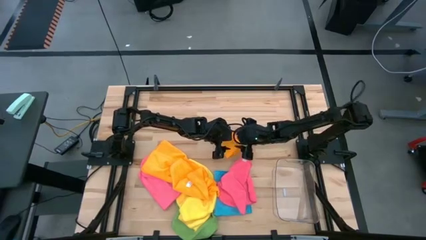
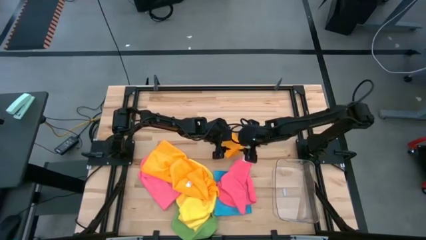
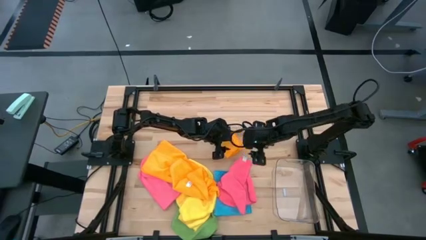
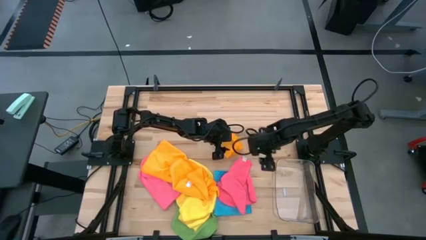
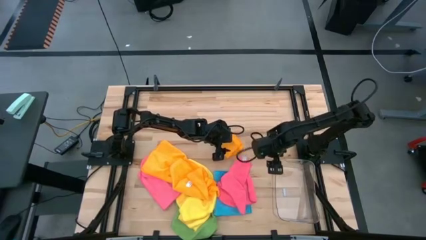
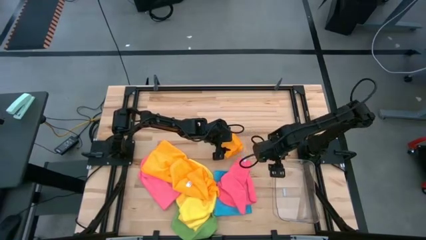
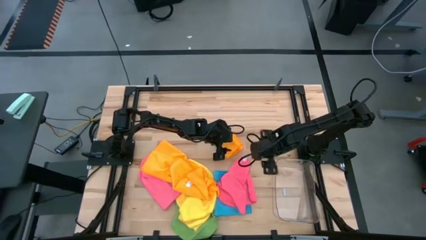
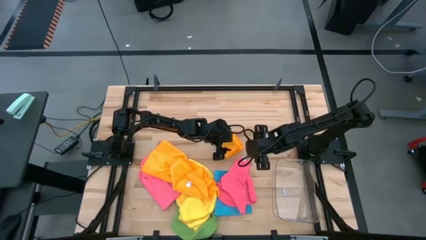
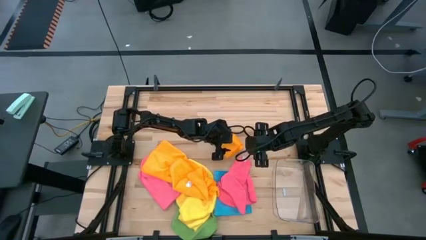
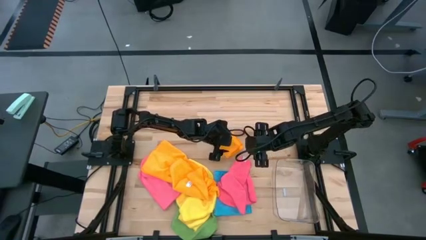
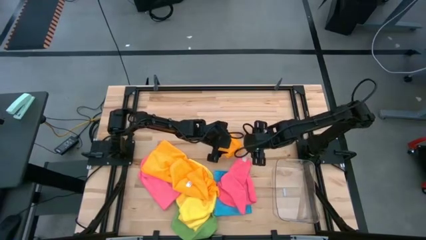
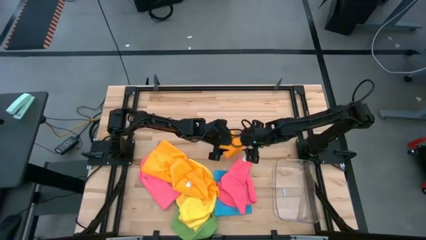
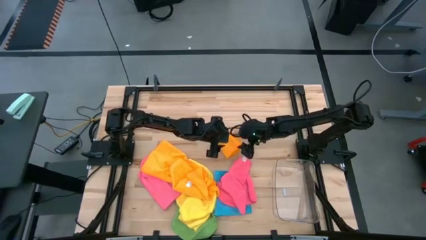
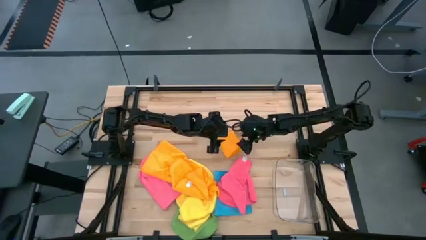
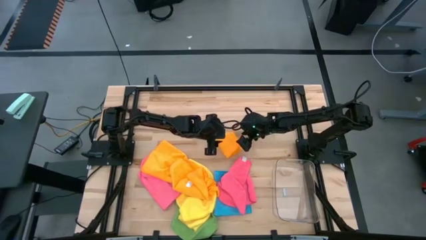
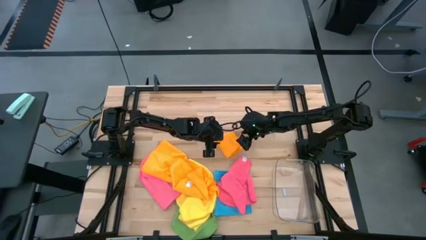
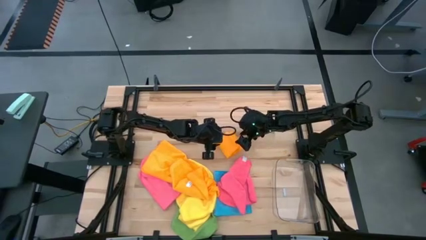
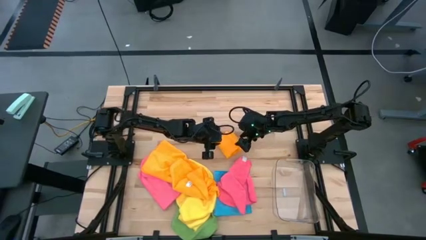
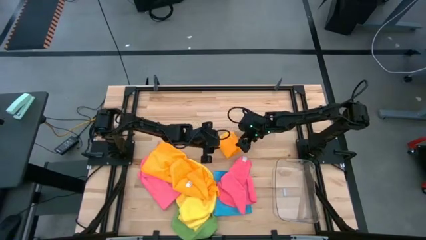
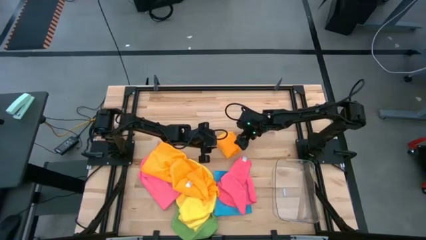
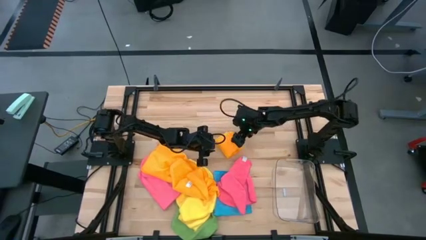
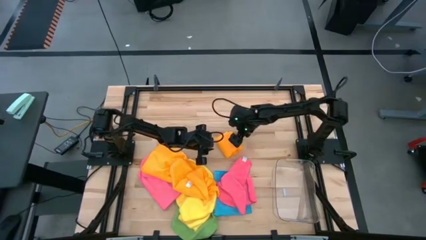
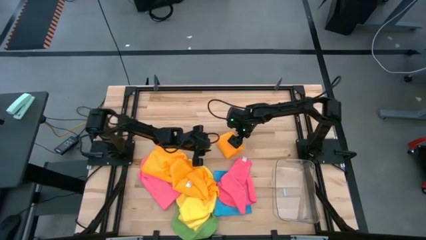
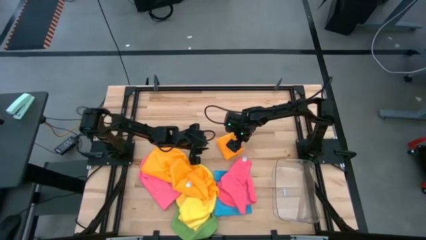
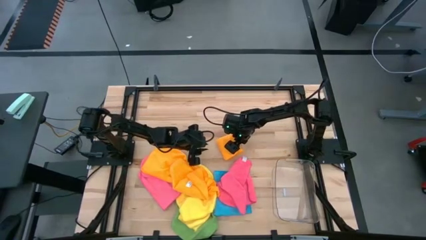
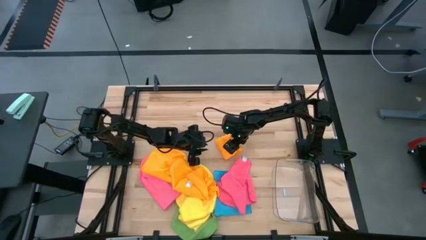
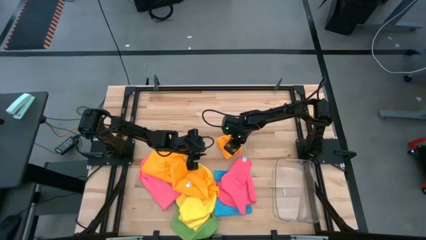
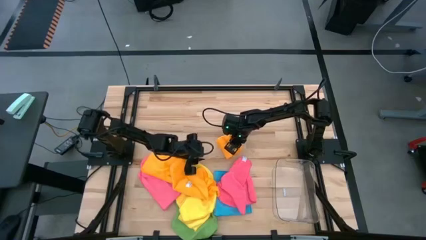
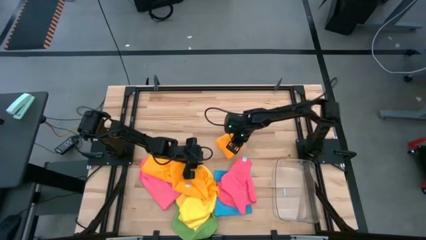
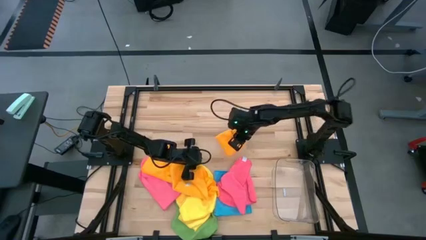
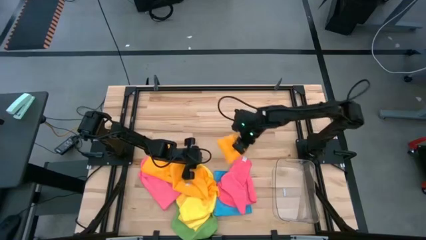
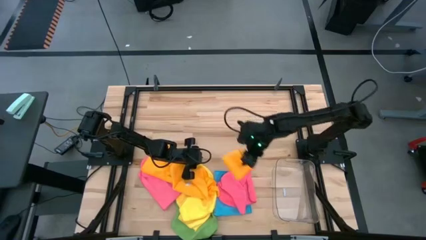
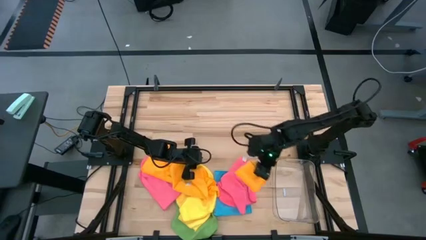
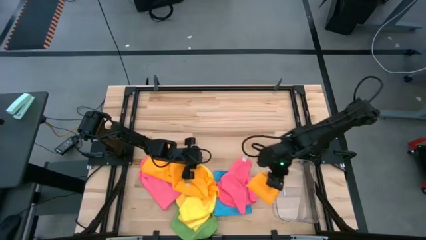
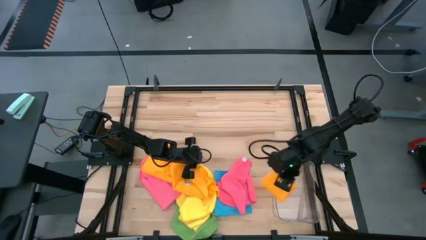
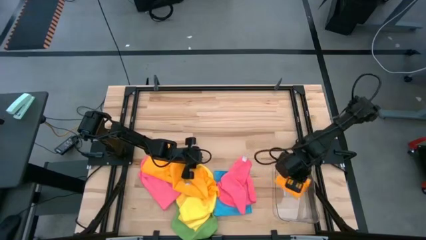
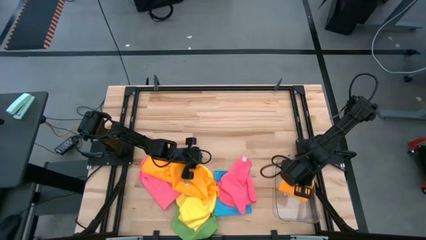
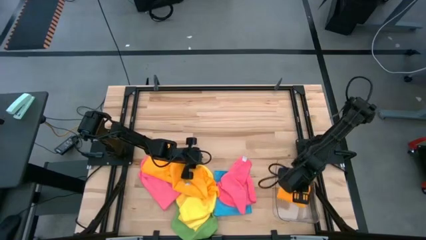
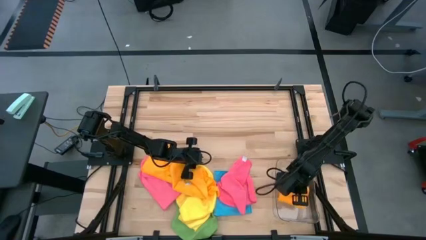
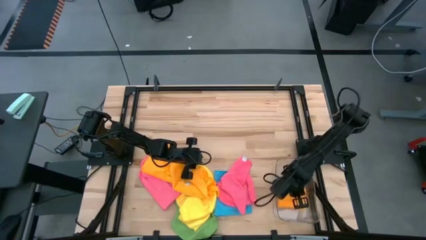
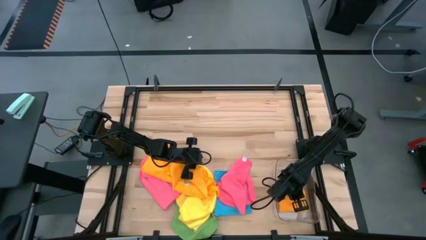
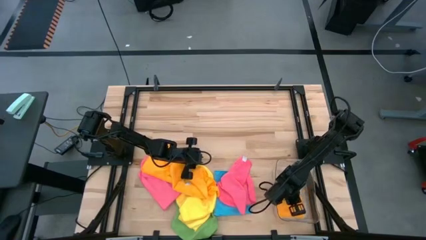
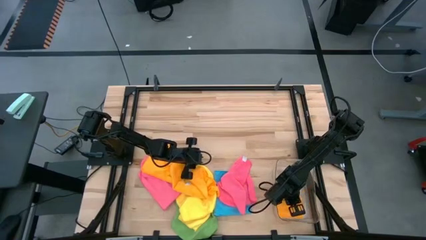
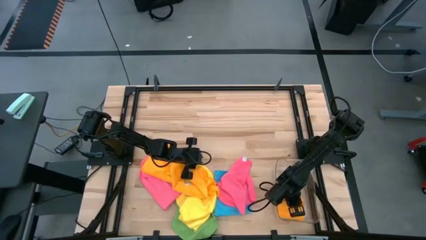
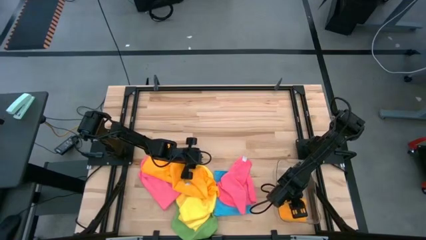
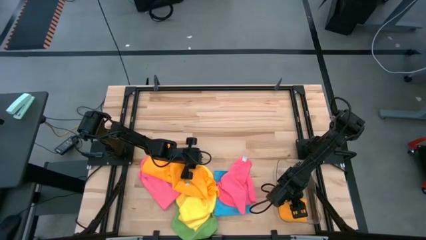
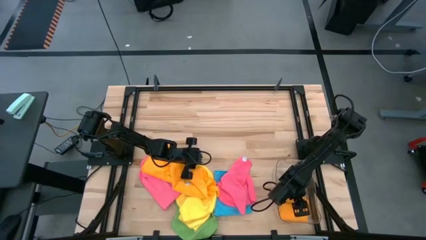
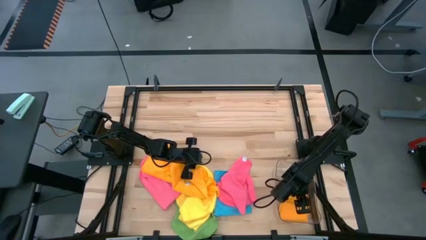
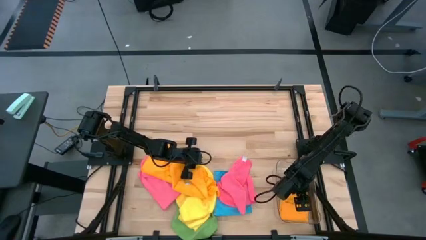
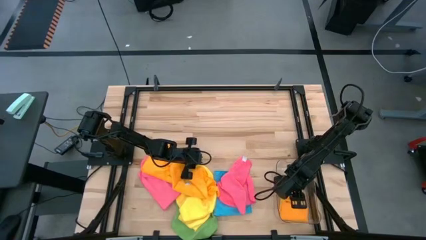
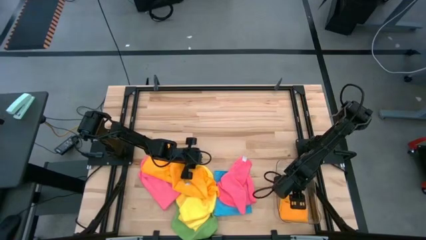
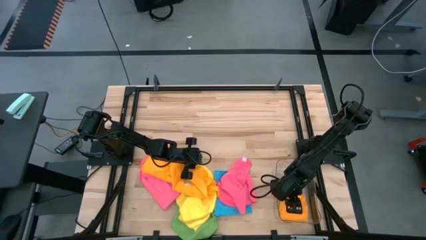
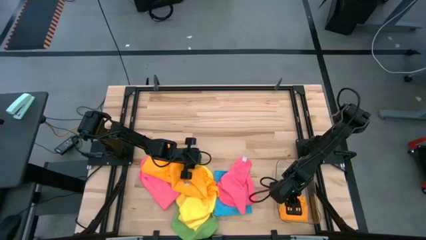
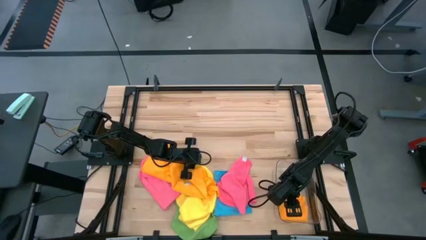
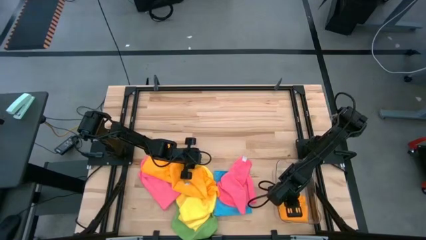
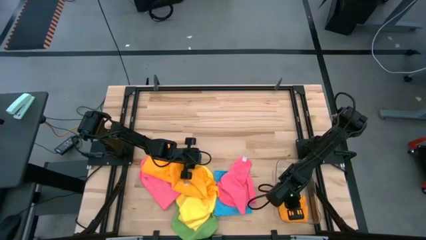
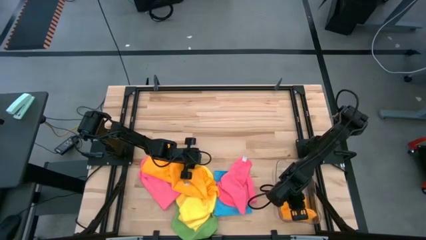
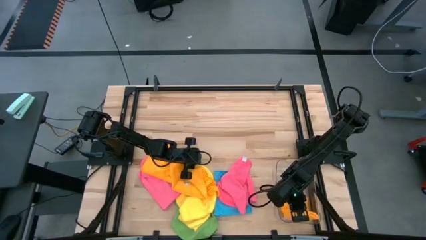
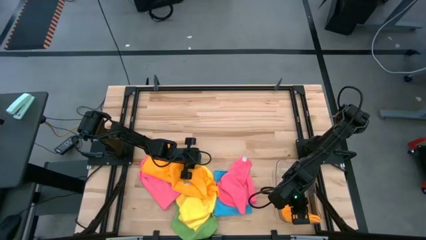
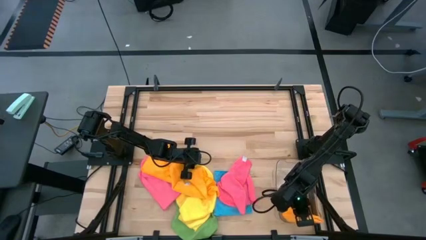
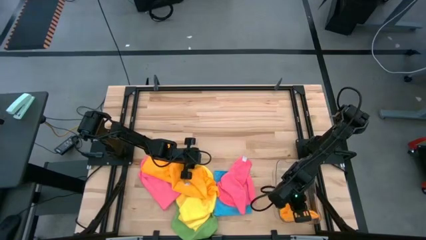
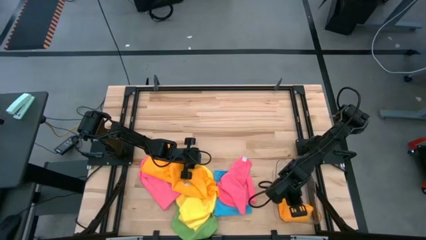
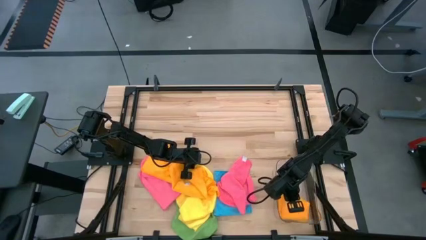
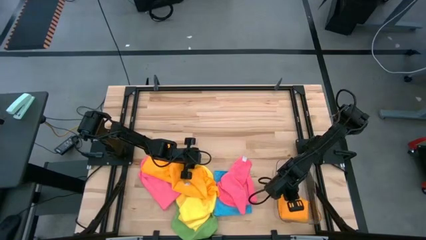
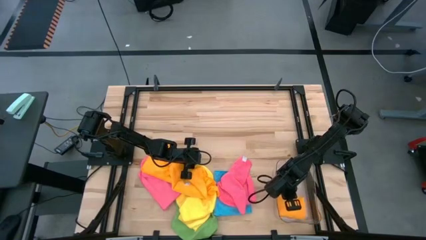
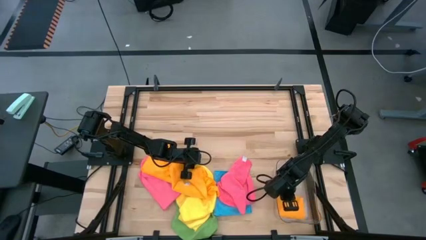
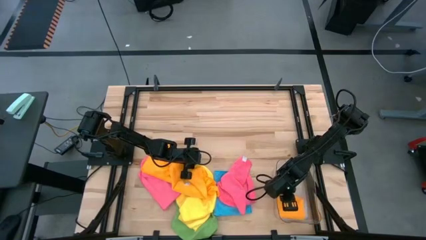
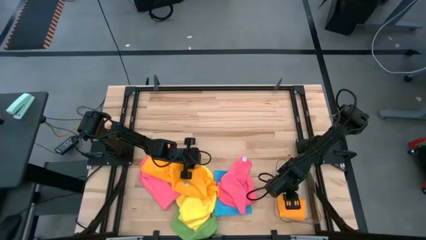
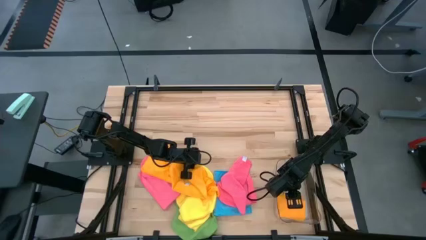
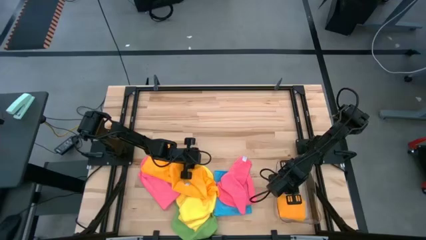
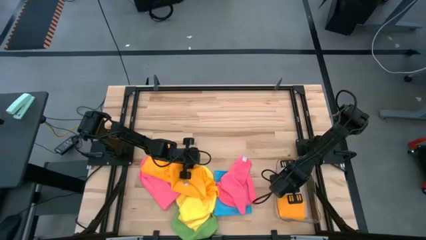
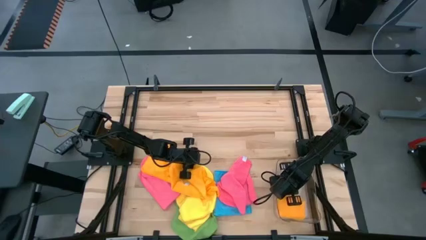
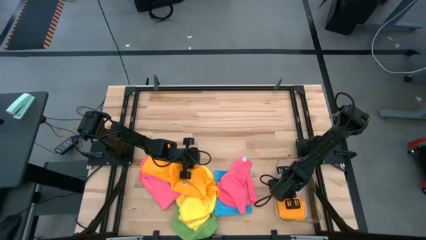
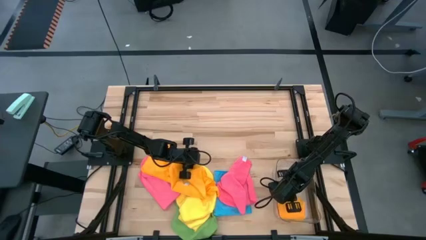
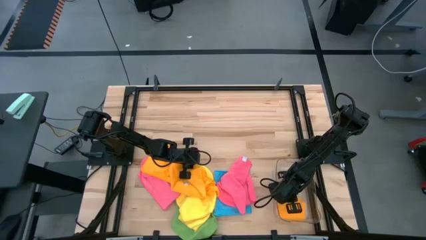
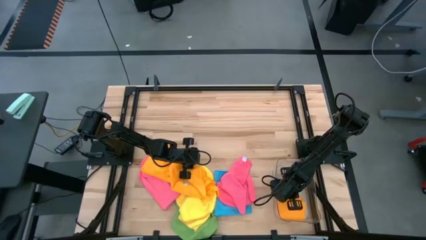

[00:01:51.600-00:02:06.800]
Task: Fold microfiber towels
Put the folded orange towel into the transparent bin

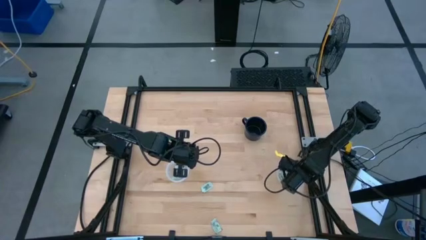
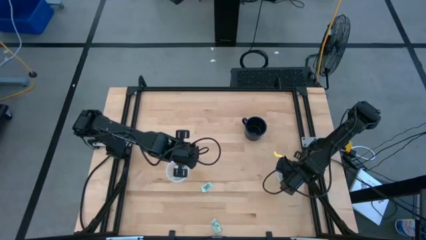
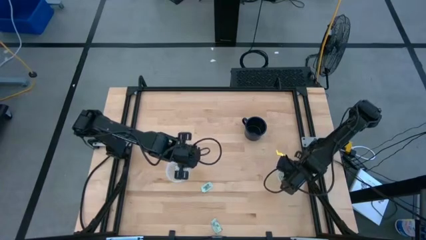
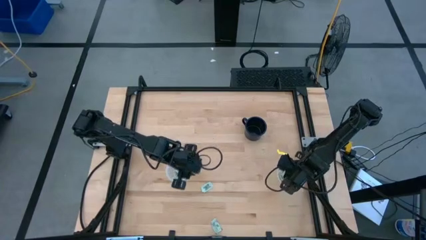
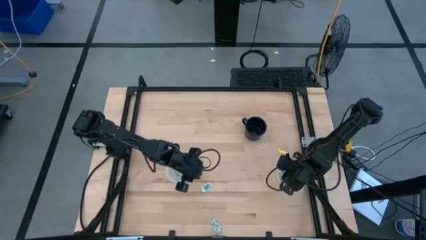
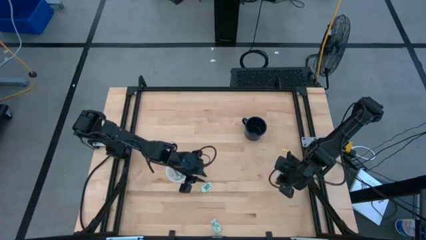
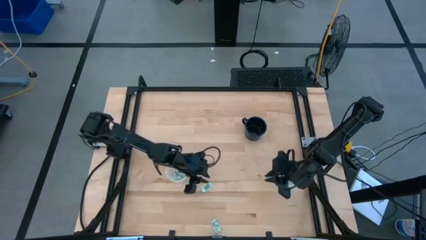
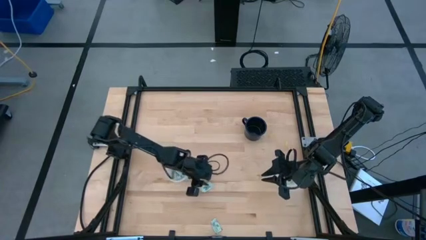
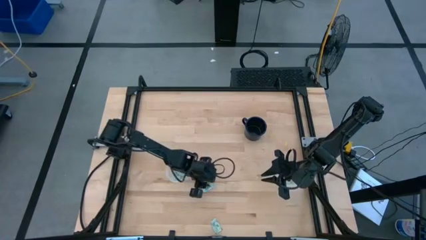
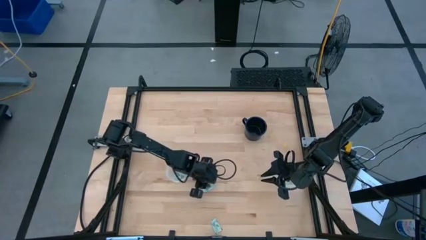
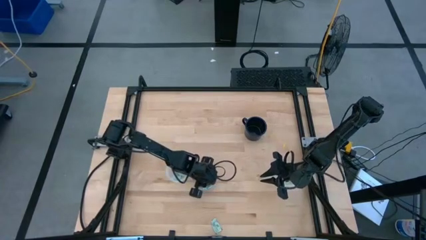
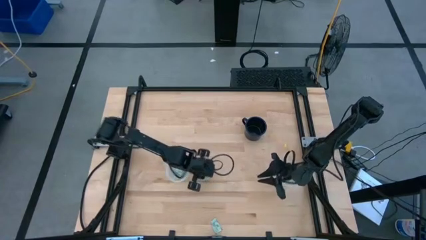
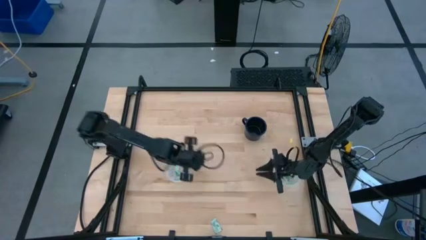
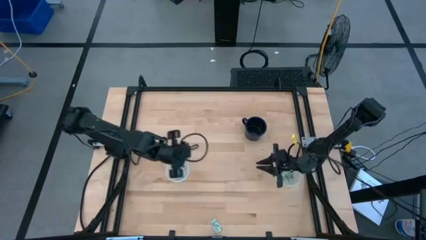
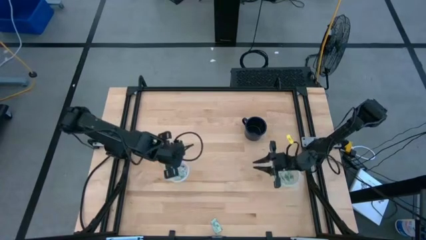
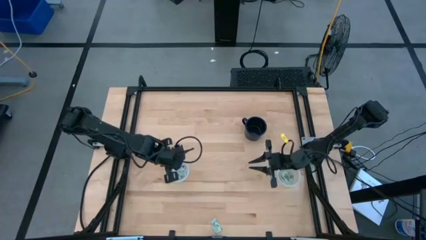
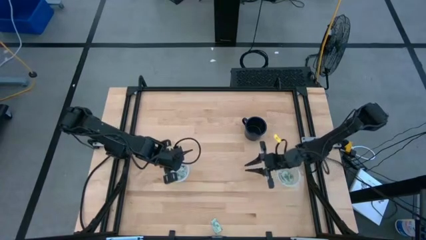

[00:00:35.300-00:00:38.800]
Task: Pick and place Stevia / Truvia into bins
Put the stevia packet into the left transparent plastic container
